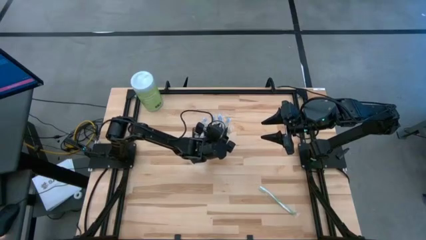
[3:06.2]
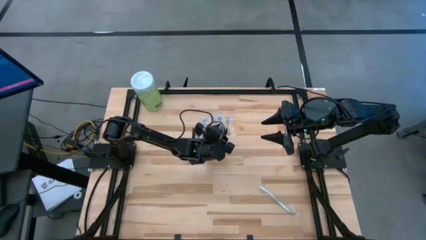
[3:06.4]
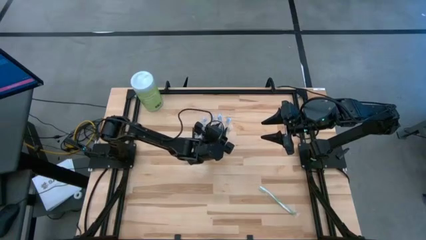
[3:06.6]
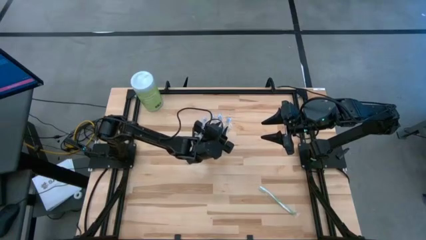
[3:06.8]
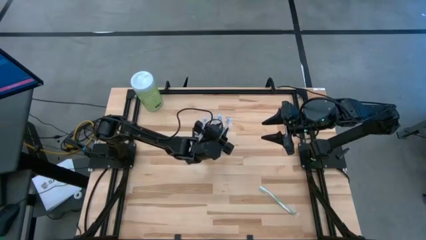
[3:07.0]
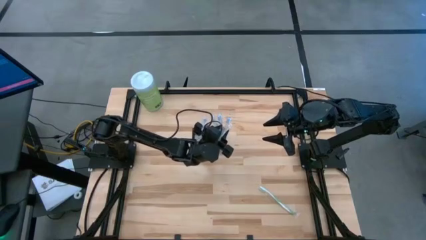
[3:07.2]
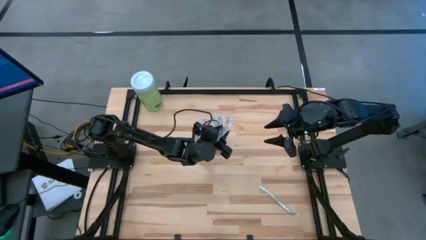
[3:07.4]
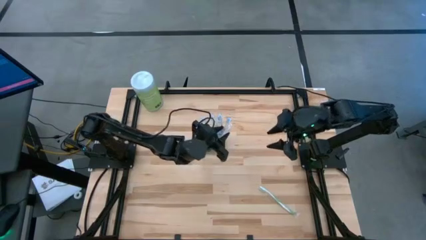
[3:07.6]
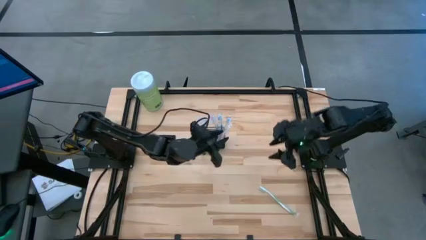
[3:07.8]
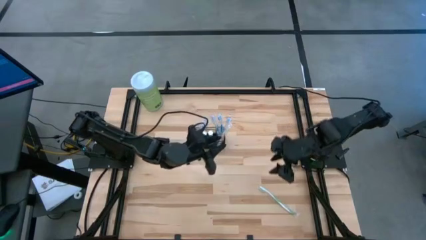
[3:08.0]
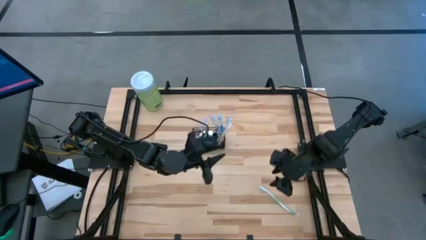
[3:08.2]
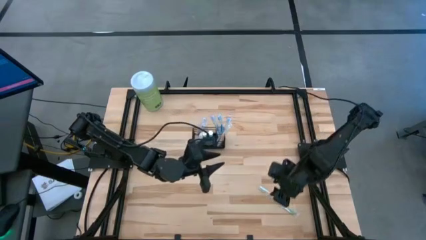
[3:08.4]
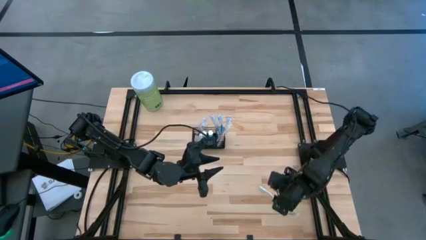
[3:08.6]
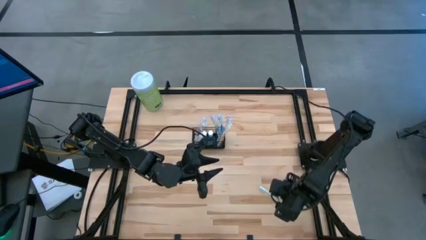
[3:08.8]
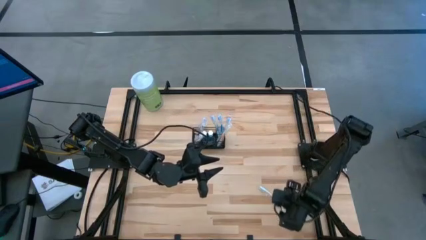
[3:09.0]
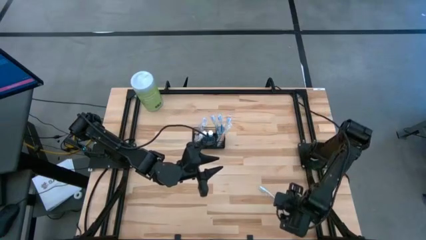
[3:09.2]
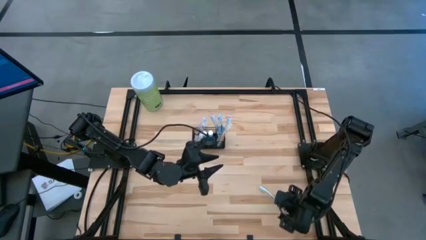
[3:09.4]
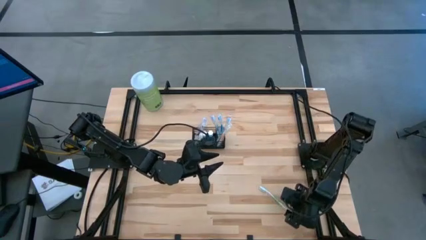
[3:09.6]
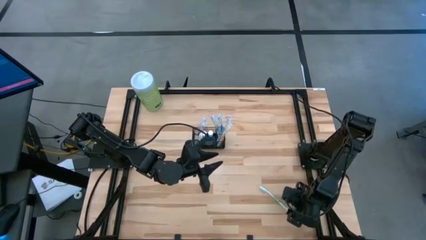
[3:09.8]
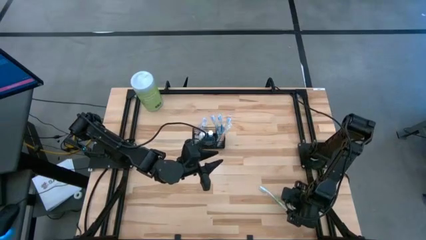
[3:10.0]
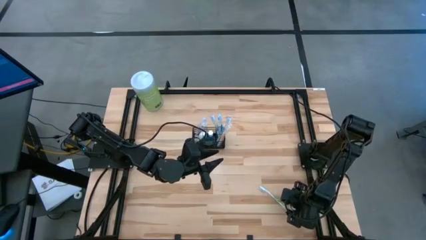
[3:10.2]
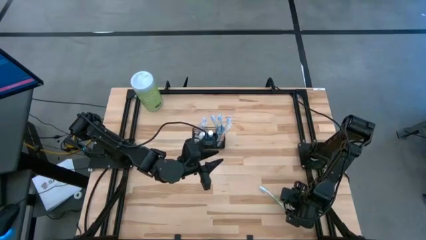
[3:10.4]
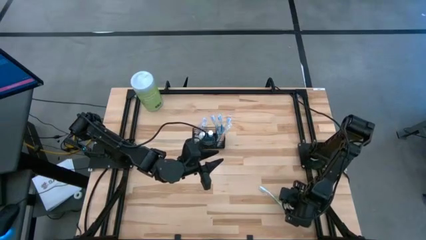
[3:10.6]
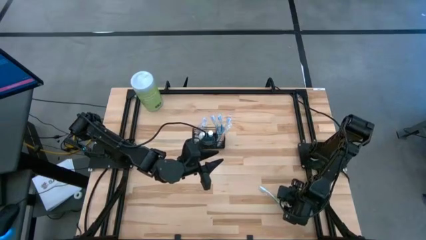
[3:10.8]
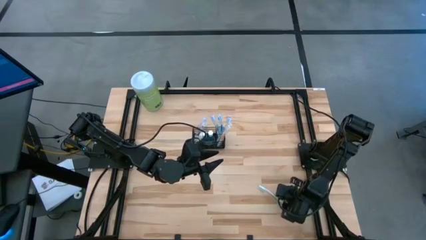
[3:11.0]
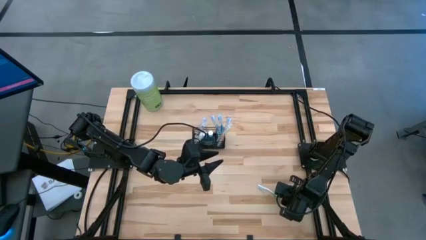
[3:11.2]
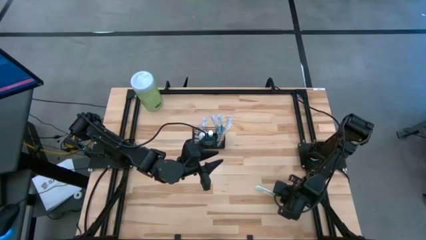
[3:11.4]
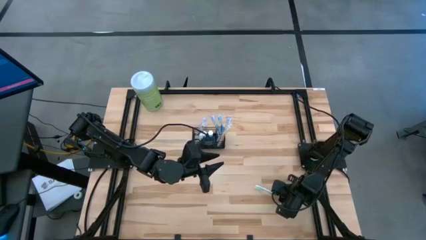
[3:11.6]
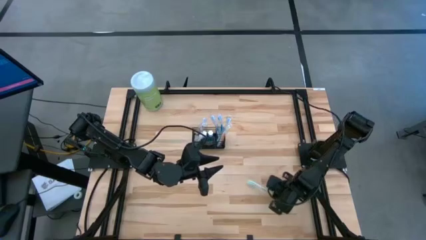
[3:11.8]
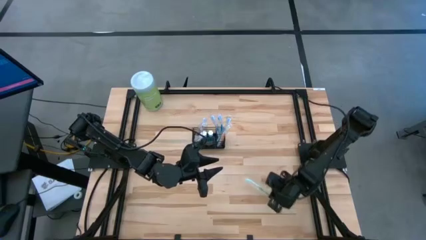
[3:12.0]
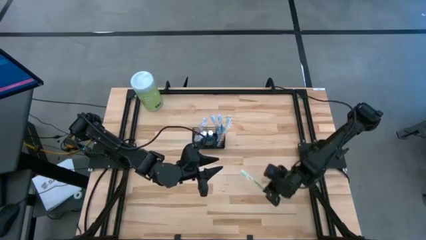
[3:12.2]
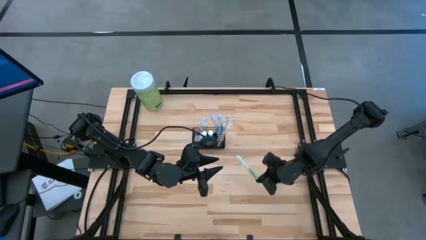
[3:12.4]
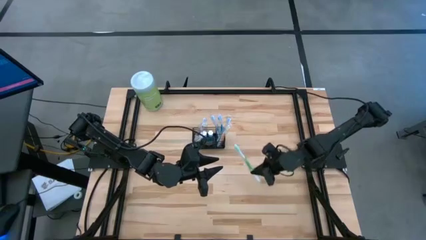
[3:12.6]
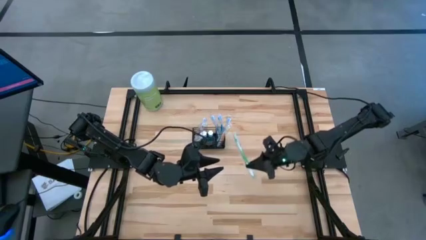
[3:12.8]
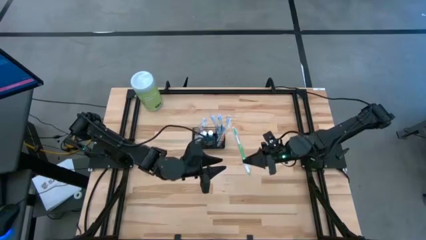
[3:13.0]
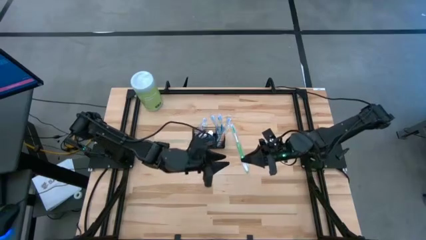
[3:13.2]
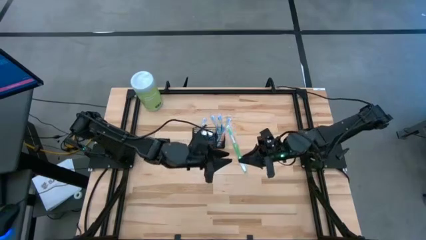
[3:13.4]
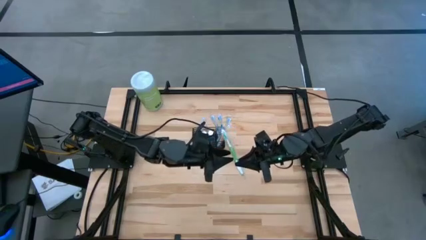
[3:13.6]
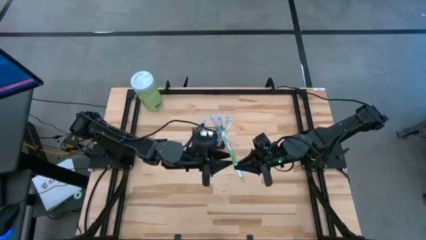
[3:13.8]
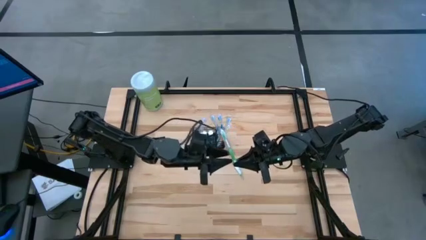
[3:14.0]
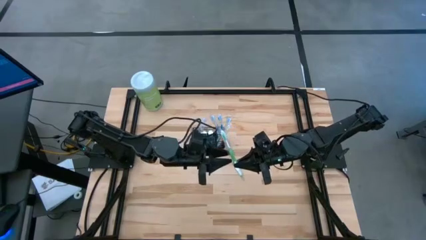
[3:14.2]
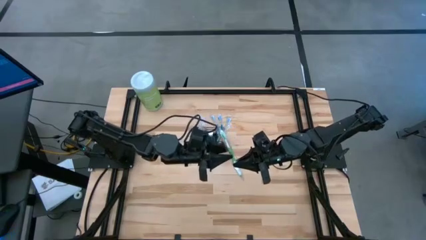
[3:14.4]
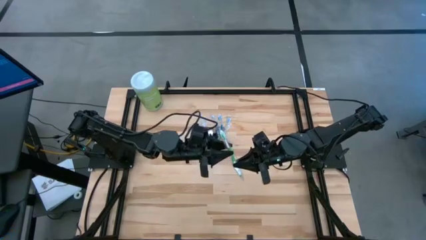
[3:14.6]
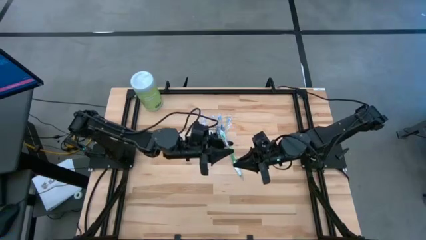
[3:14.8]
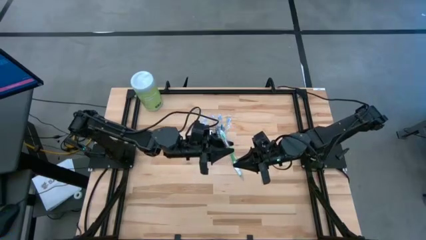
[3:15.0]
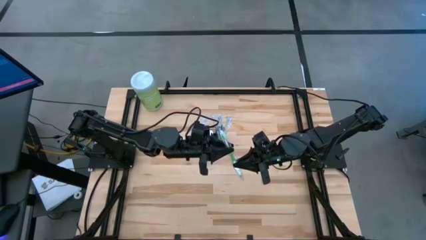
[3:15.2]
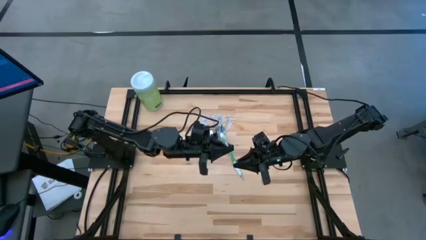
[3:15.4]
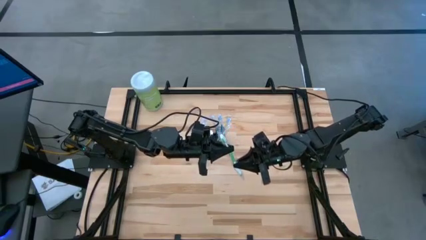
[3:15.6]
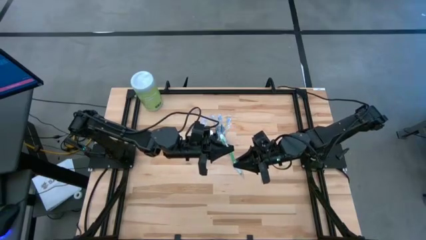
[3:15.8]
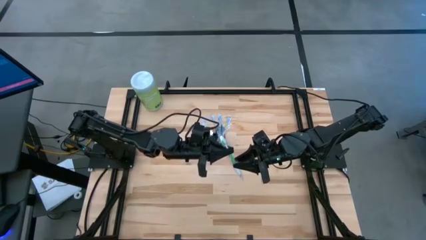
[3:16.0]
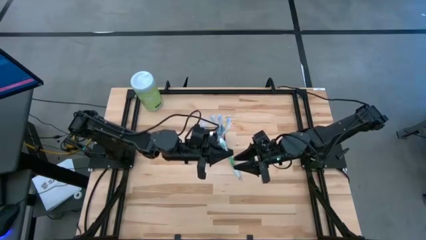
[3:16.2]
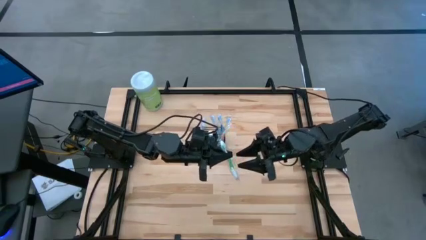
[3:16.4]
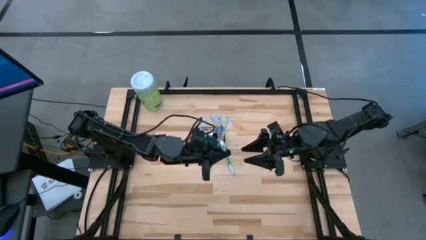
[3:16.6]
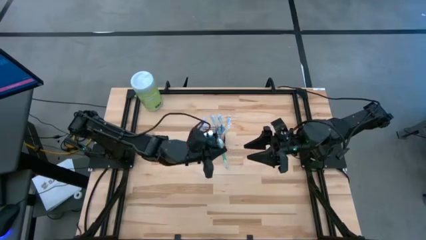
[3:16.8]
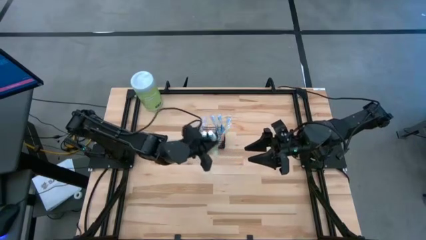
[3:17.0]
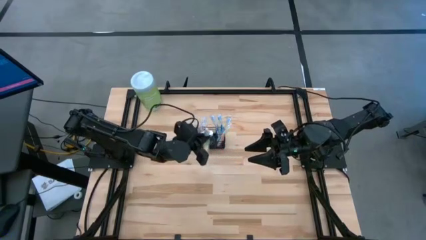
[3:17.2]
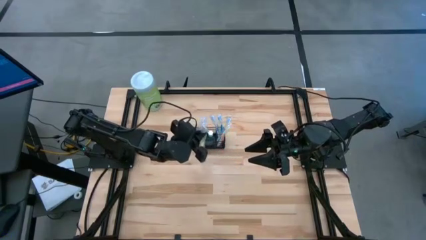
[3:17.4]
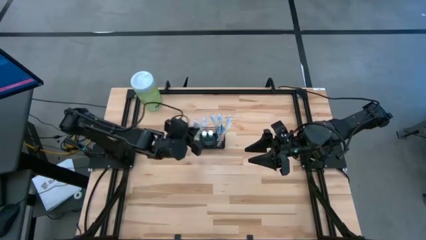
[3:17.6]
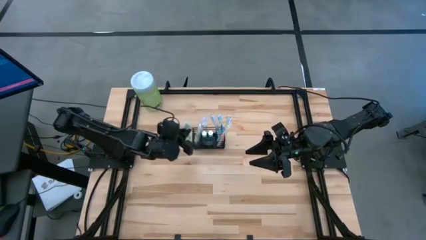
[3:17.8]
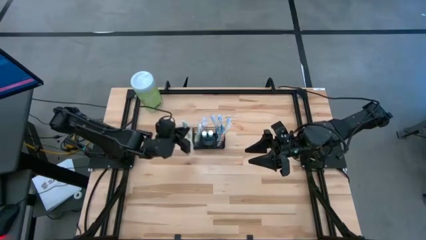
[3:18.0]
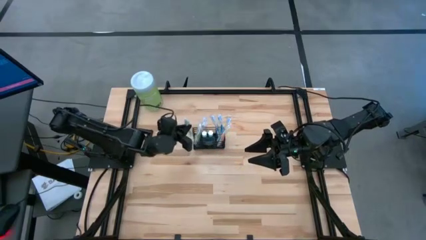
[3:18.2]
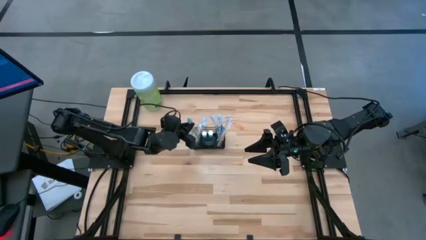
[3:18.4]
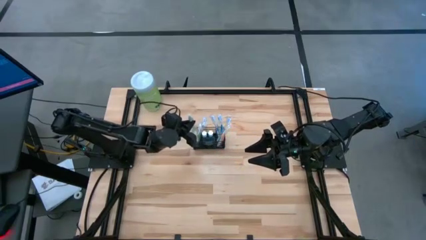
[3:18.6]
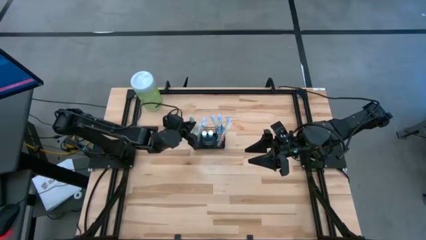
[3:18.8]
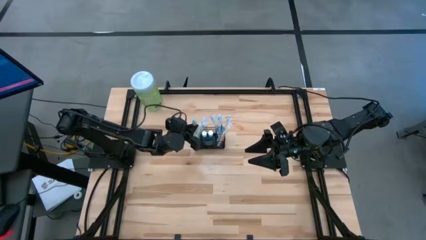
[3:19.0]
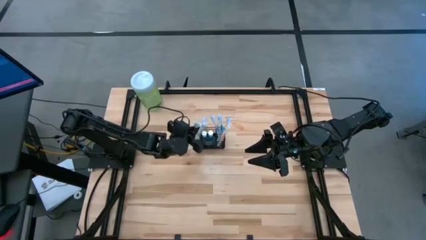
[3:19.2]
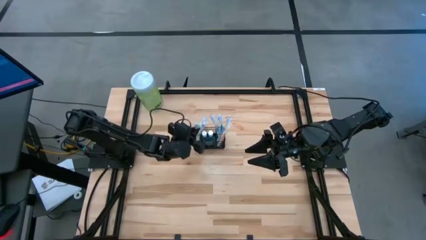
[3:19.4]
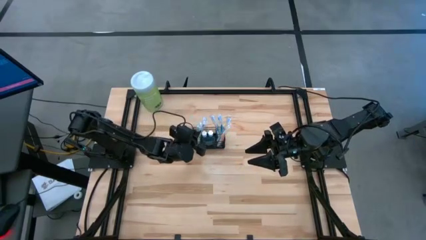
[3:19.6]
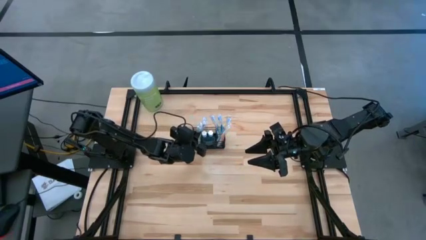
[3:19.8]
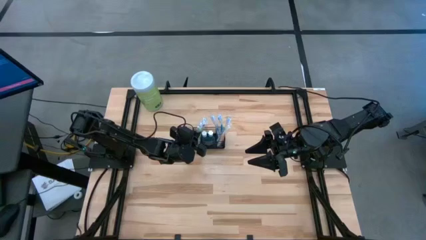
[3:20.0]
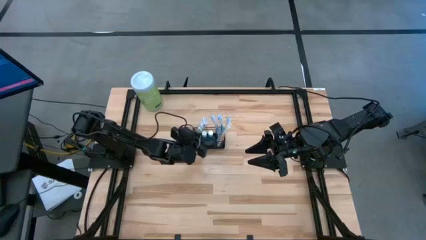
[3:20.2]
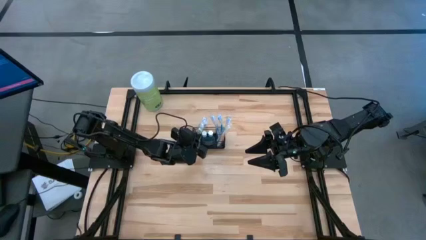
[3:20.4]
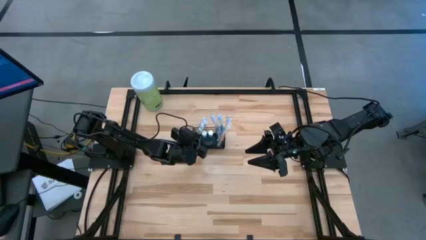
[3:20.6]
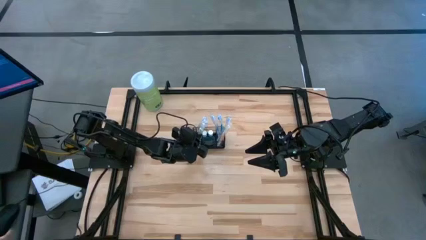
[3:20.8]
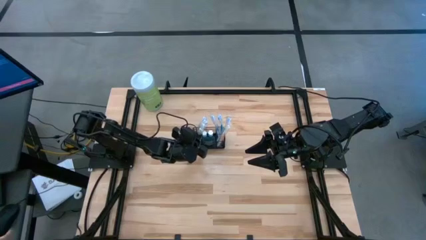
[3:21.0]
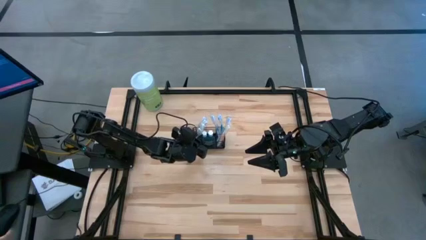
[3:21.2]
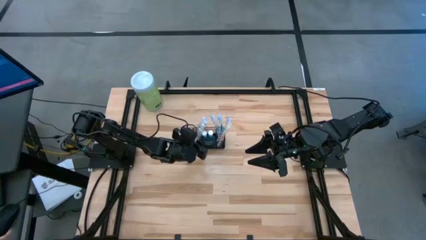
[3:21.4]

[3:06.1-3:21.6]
Task: Pick & Place toothbrushing station
Put the green toothbrush into the black mesh organizer
